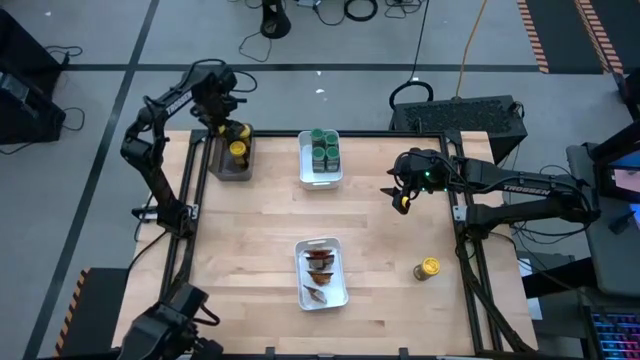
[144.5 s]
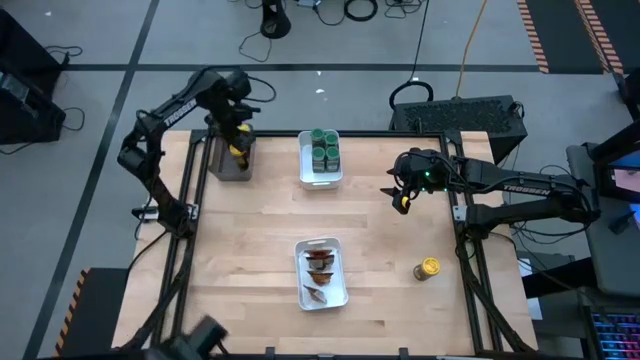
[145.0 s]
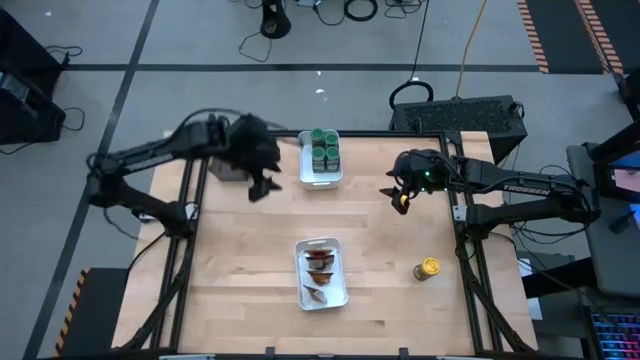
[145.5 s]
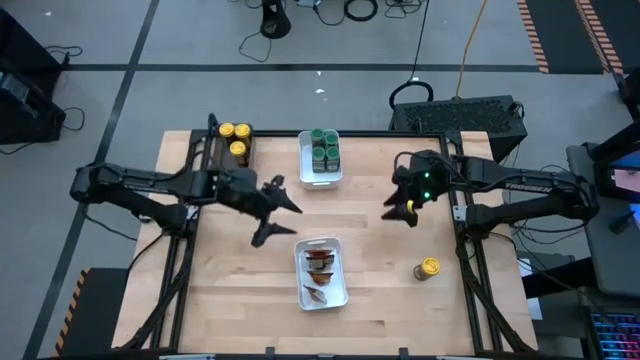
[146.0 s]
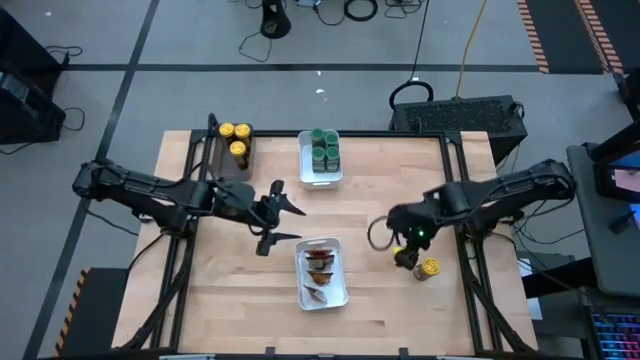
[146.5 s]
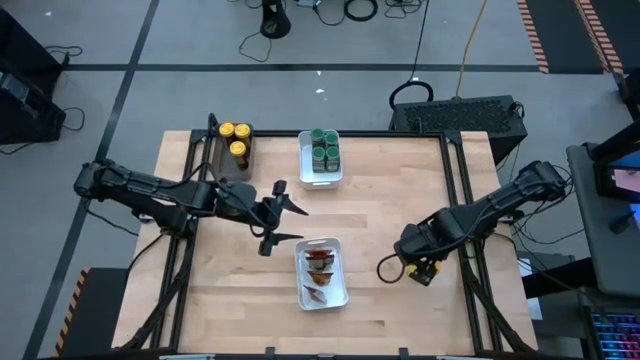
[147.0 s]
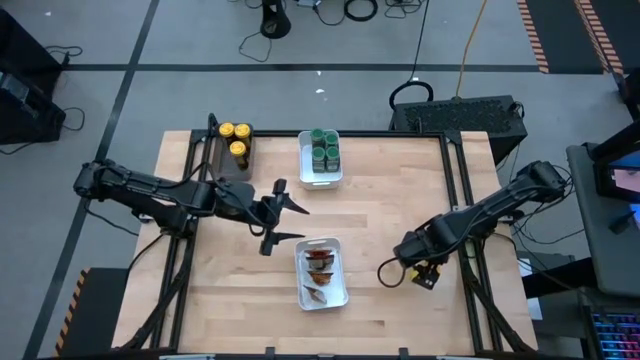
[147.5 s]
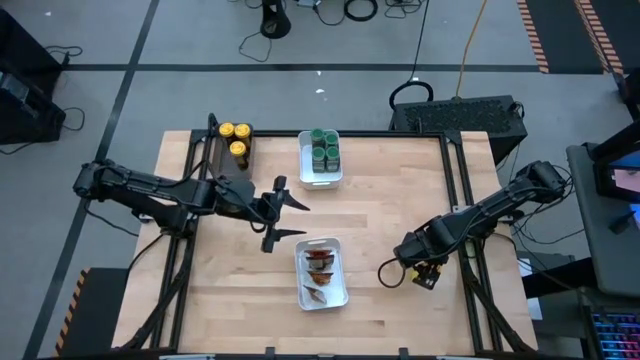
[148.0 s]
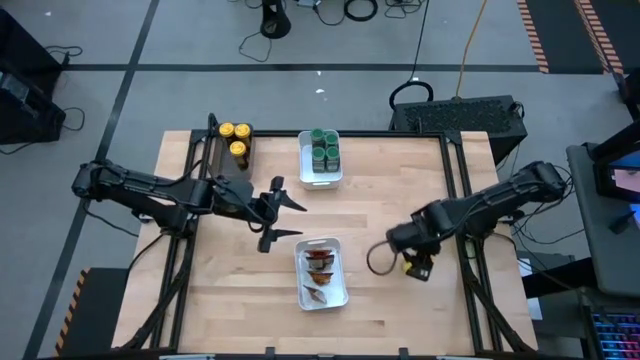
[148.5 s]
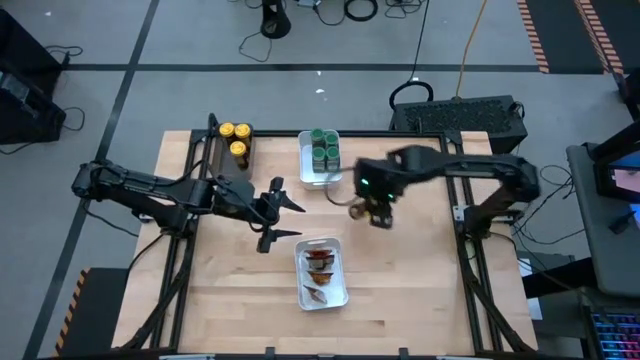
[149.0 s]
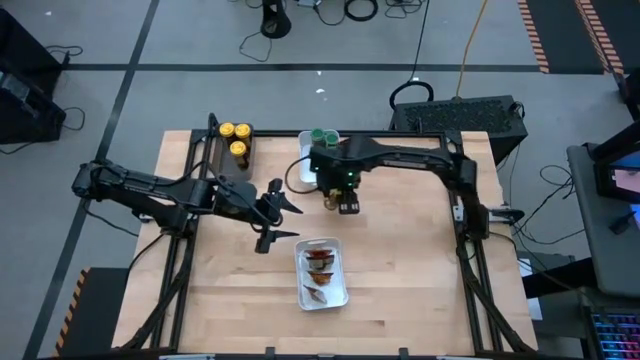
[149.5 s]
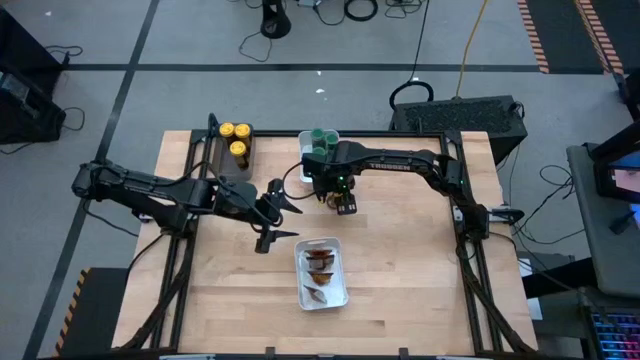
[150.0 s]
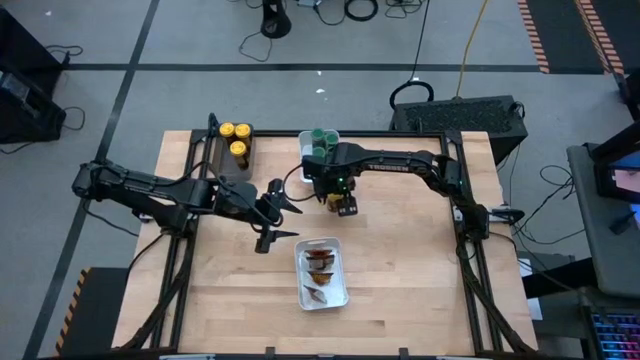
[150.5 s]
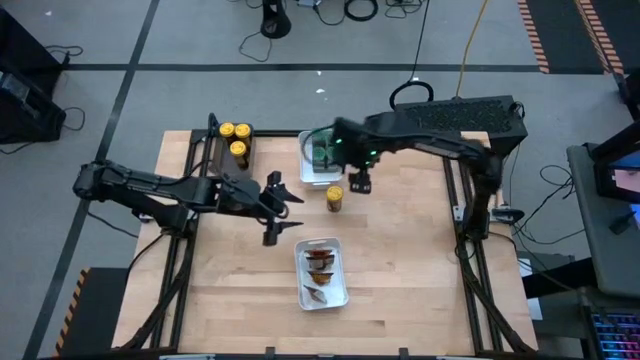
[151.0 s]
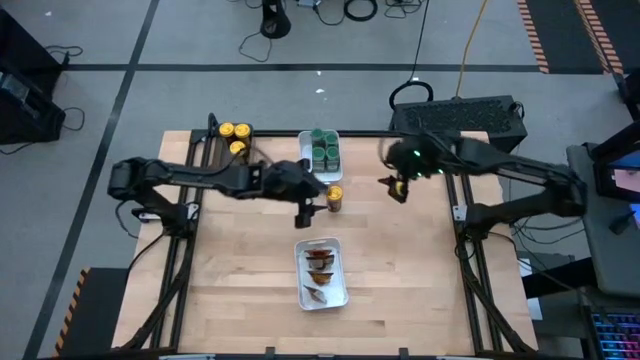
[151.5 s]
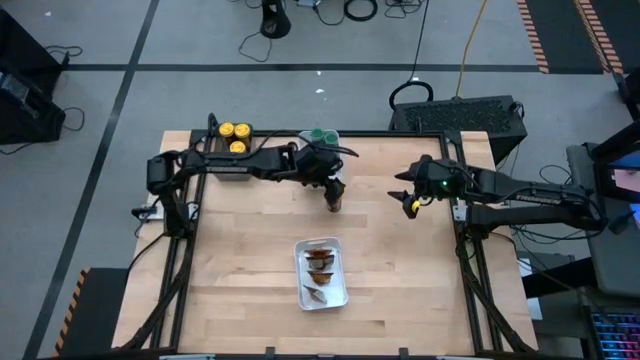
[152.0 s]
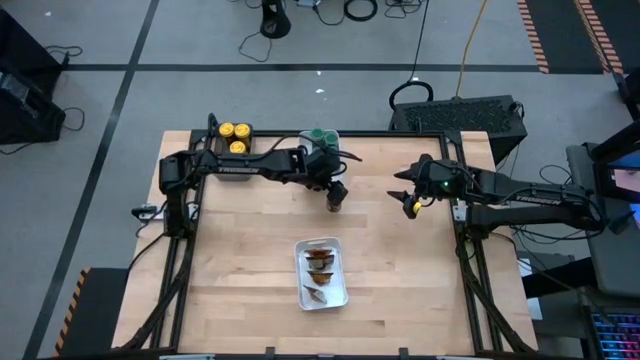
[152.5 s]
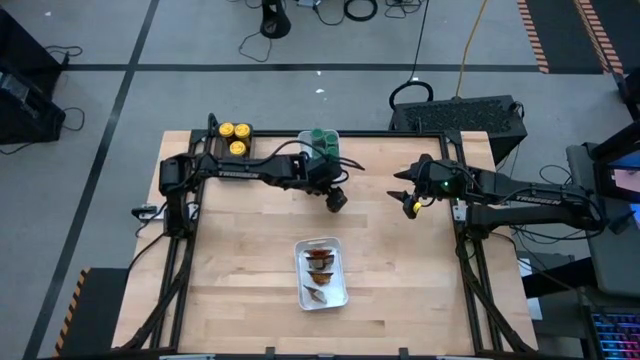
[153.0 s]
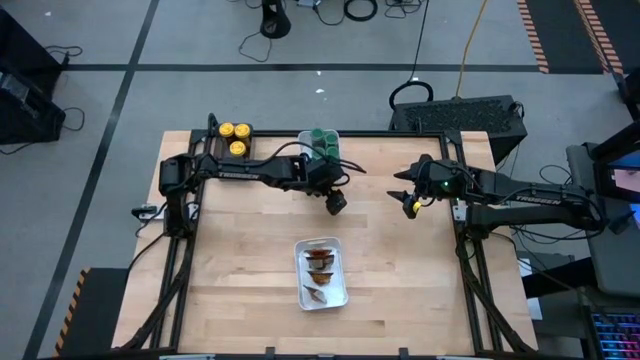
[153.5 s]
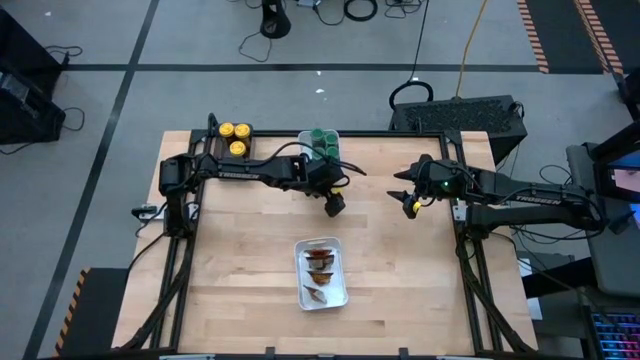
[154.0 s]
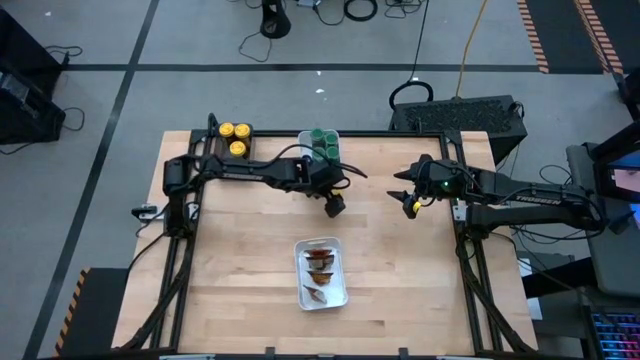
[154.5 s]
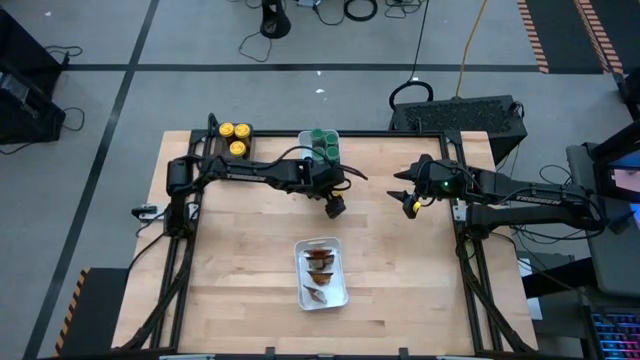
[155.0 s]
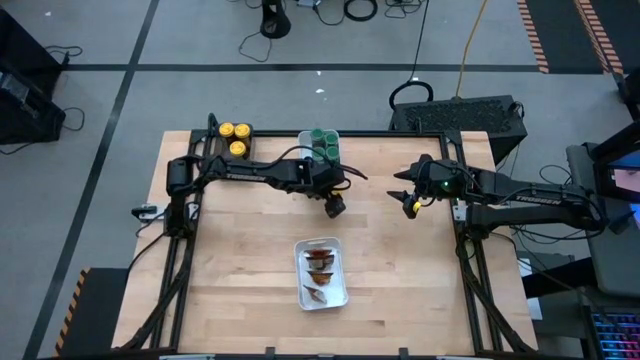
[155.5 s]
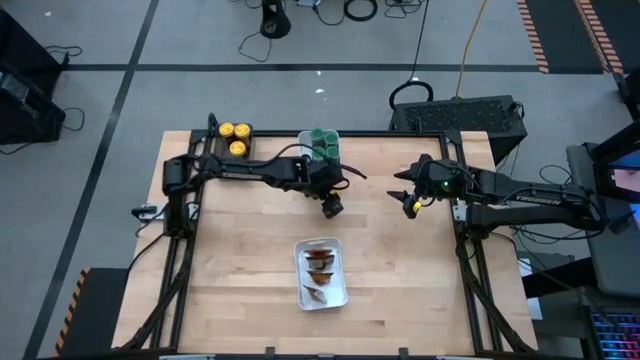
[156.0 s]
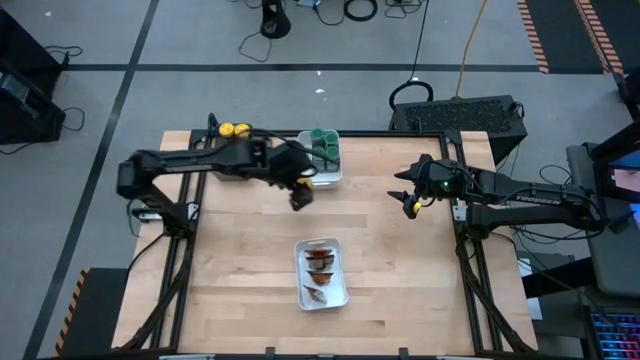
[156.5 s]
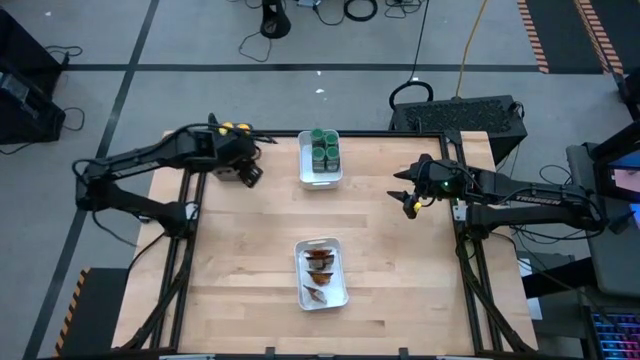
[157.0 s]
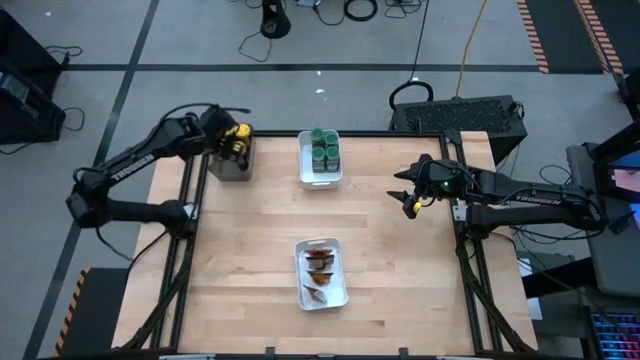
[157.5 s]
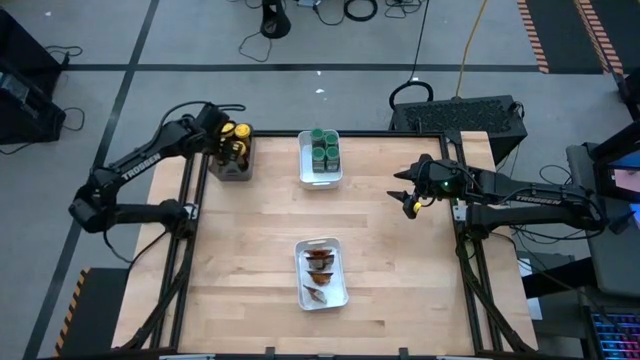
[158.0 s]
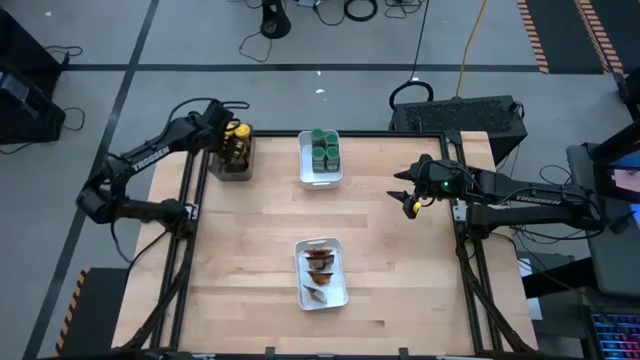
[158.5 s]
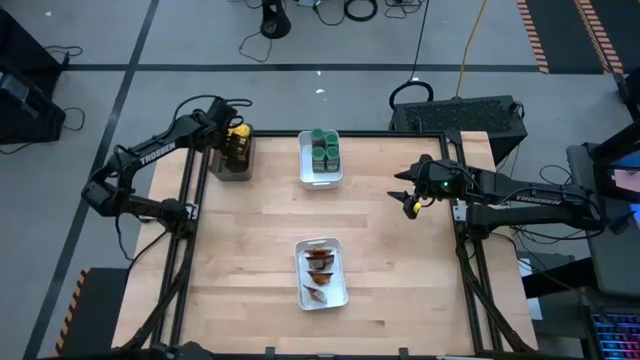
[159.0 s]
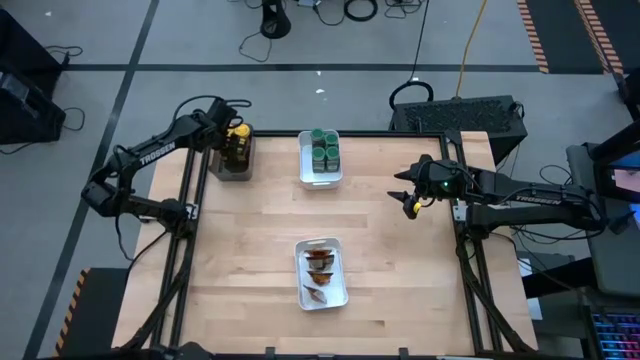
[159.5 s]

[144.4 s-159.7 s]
Task: Sort spices by type
Put the yellow spice bottle into the transparent black bin

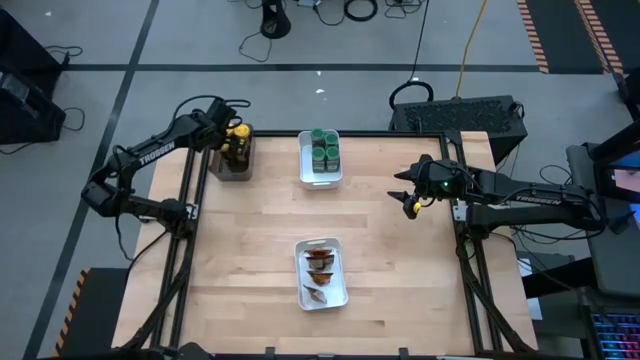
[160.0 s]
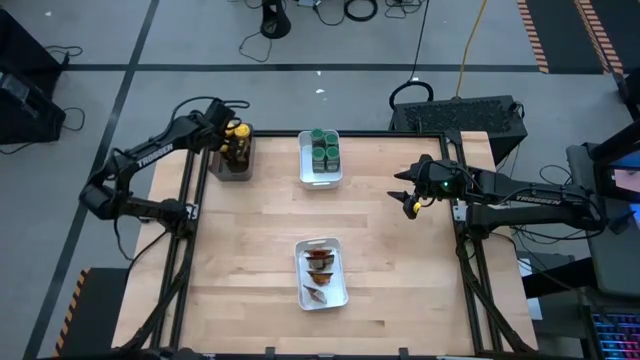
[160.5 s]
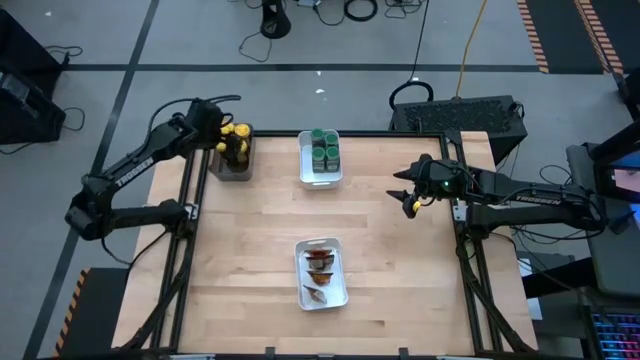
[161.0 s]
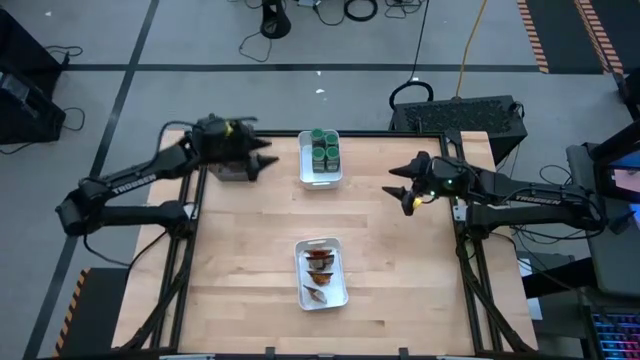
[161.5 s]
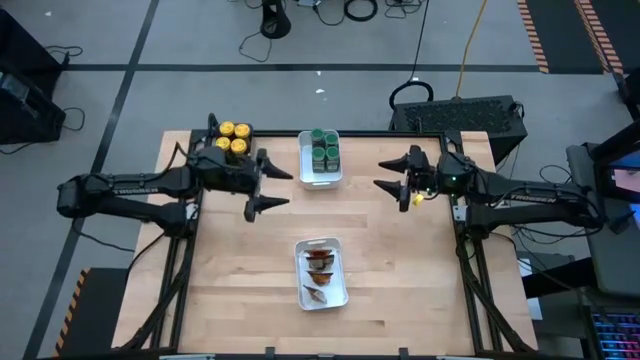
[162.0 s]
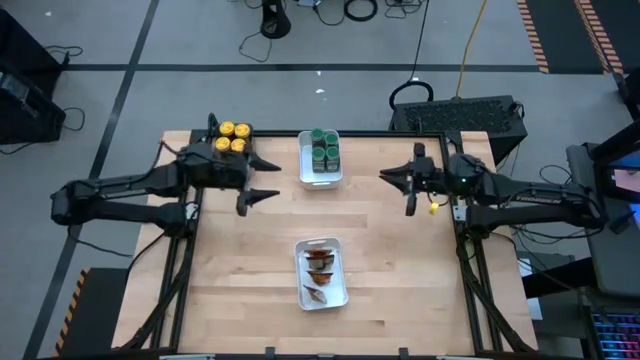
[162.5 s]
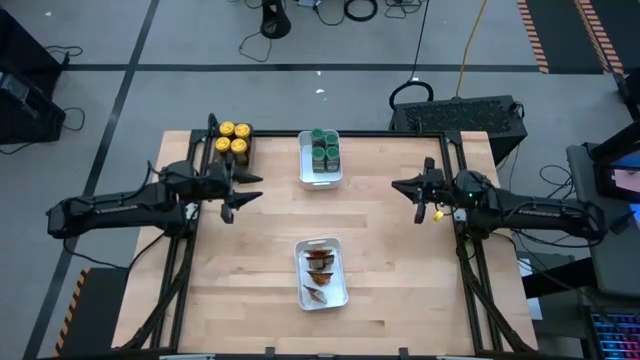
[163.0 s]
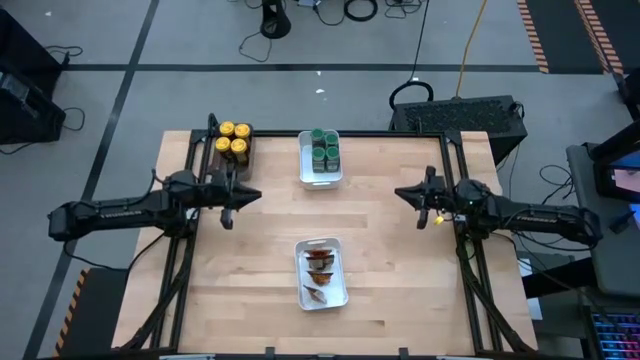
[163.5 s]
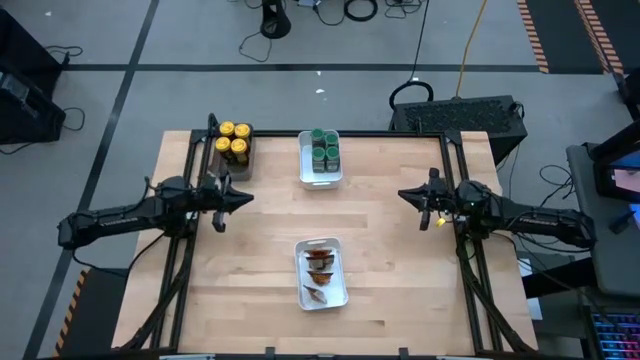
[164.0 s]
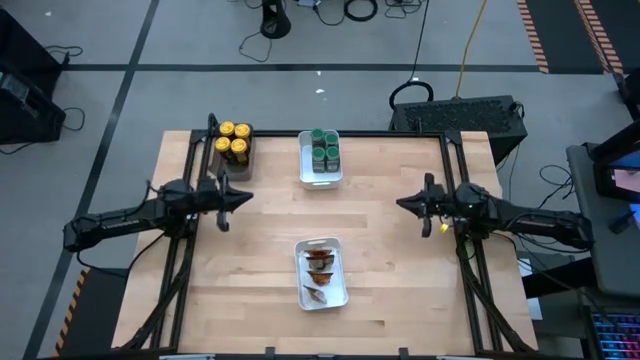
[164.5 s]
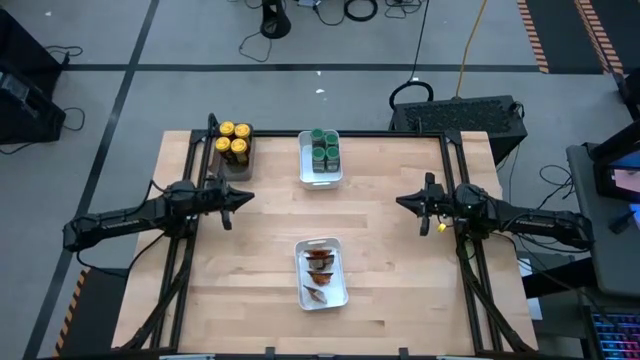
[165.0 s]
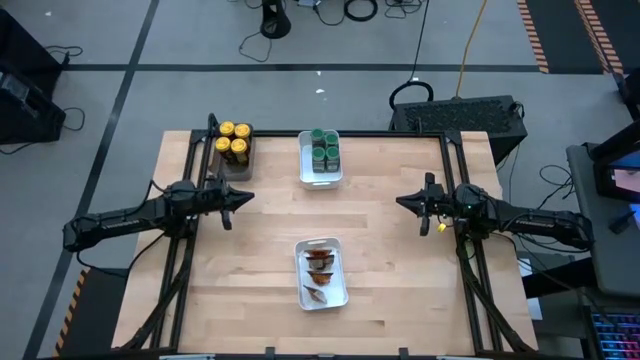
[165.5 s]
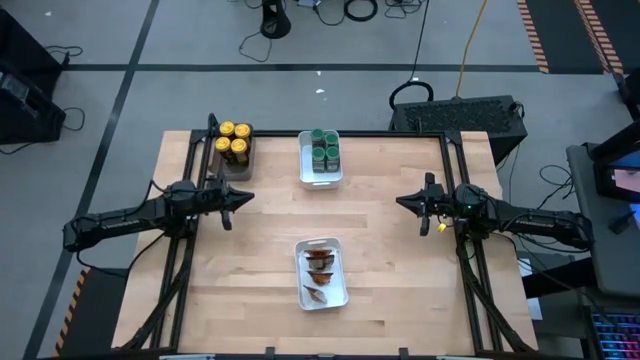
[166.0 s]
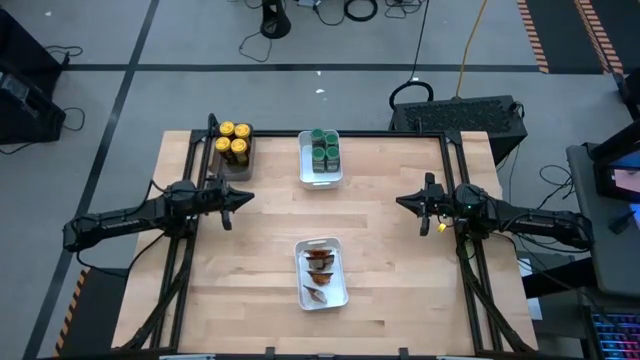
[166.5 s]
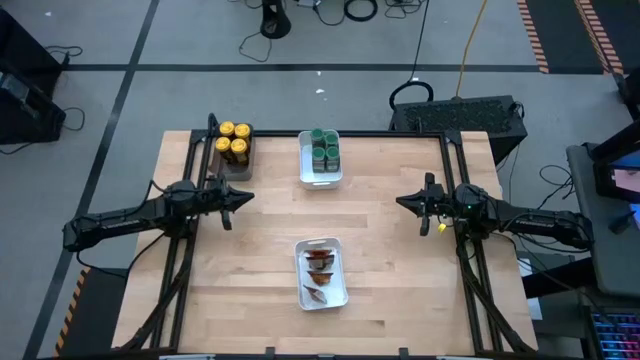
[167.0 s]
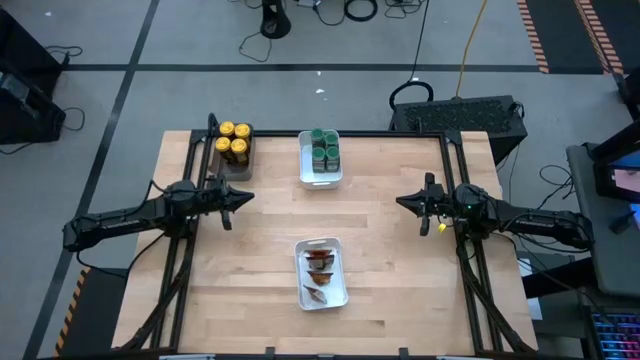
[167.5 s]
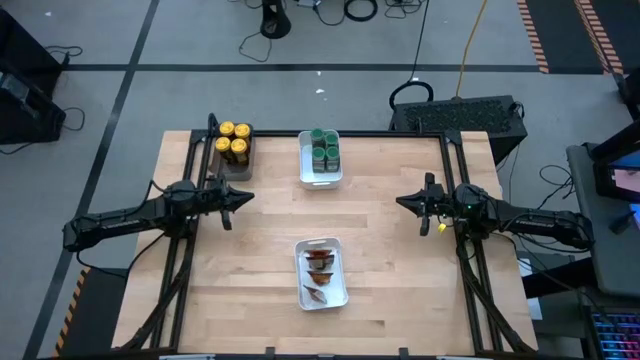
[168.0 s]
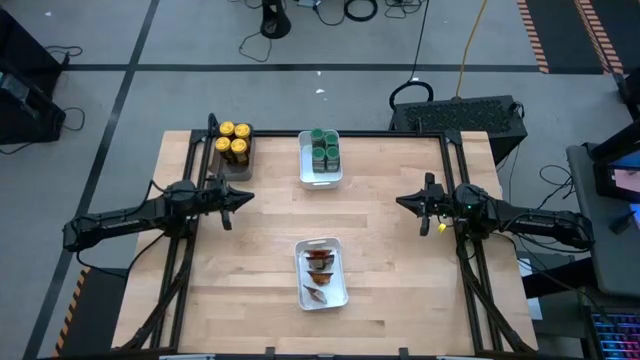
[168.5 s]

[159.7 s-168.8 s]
Return to Home Position
